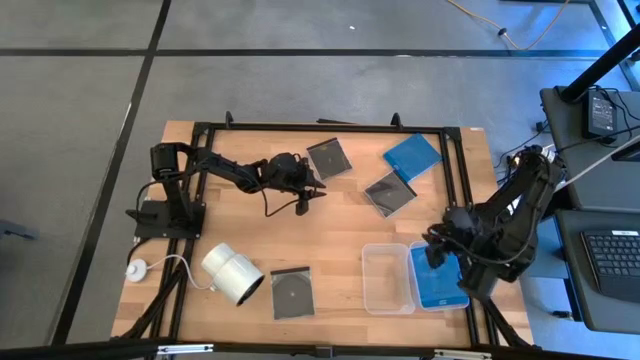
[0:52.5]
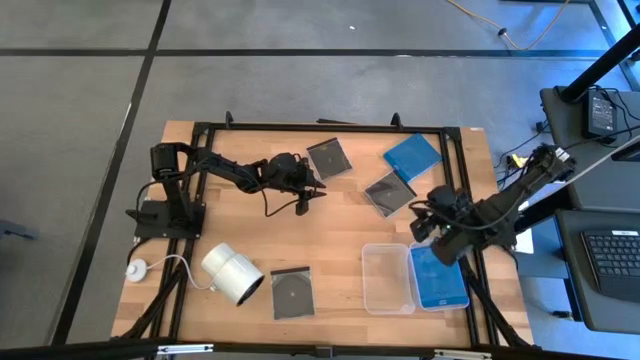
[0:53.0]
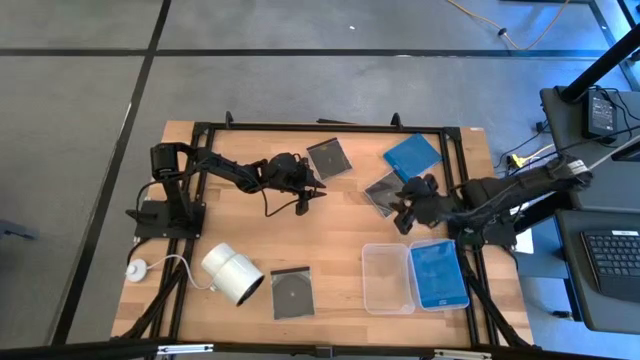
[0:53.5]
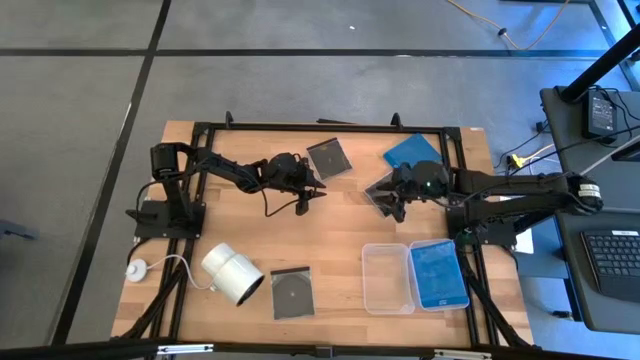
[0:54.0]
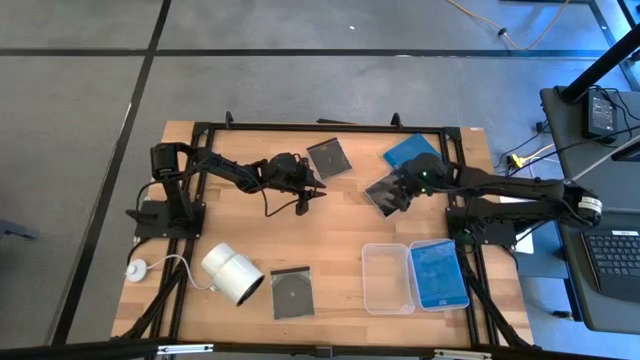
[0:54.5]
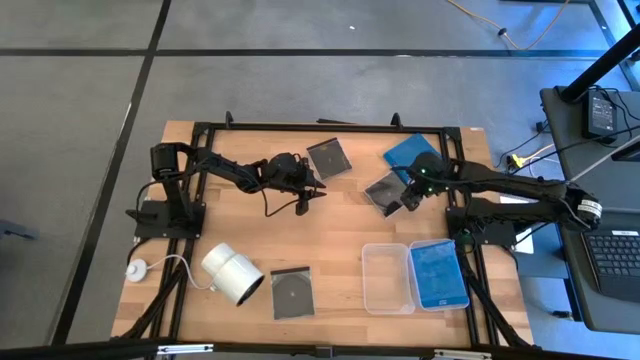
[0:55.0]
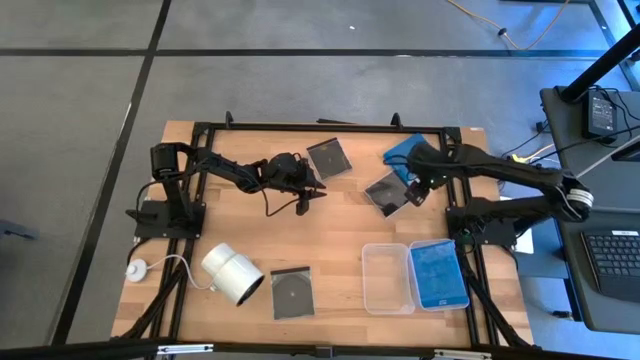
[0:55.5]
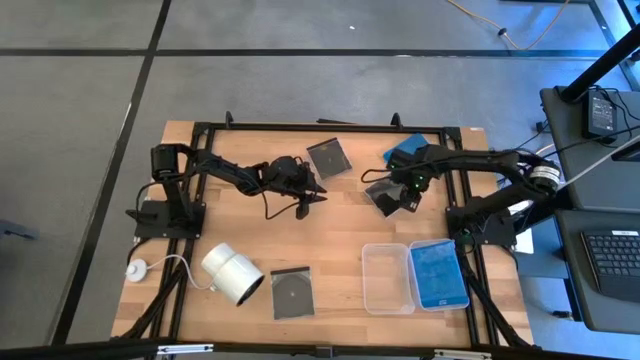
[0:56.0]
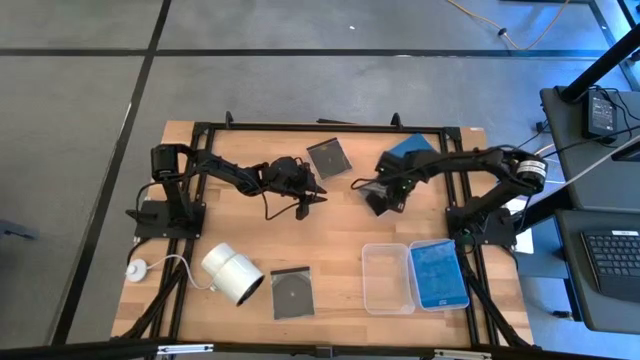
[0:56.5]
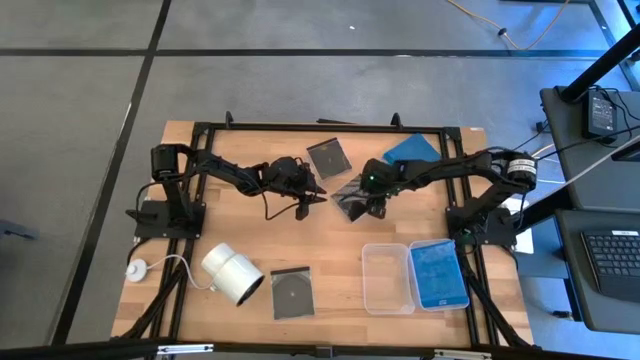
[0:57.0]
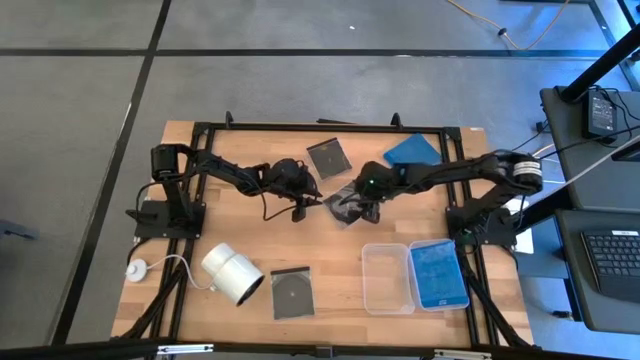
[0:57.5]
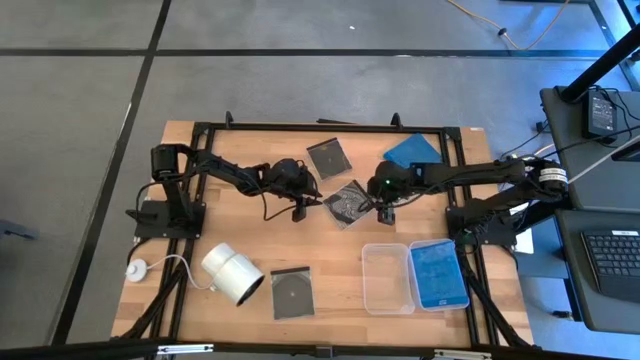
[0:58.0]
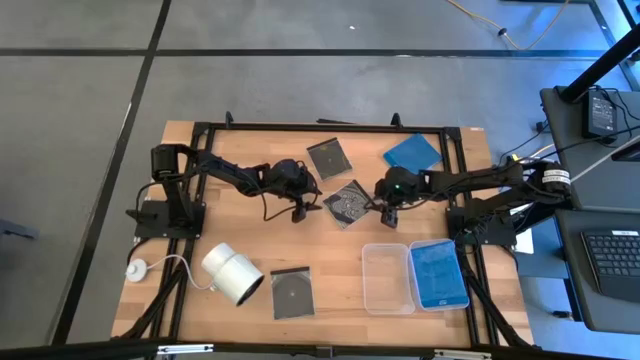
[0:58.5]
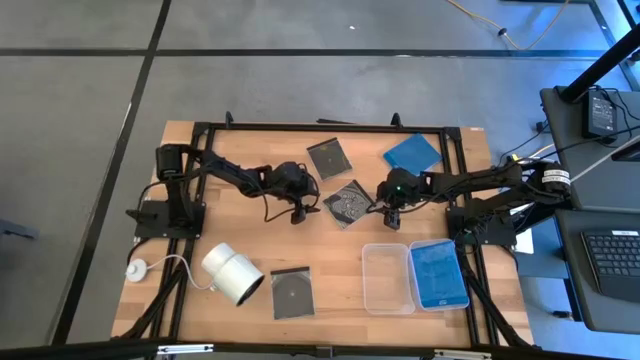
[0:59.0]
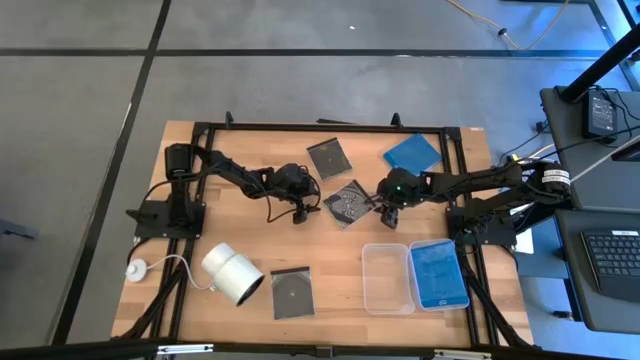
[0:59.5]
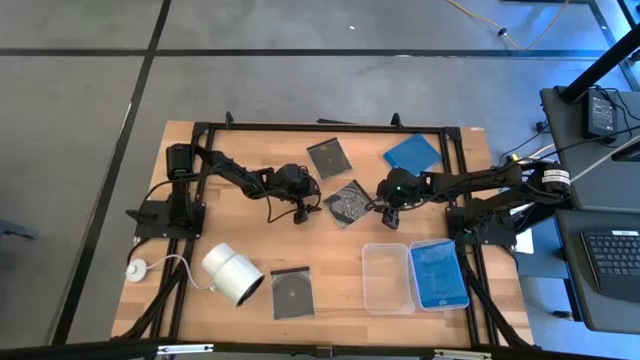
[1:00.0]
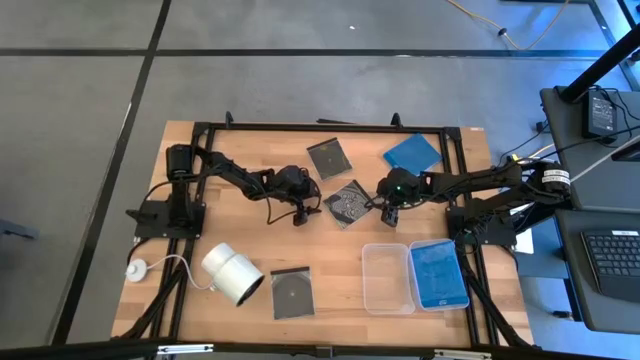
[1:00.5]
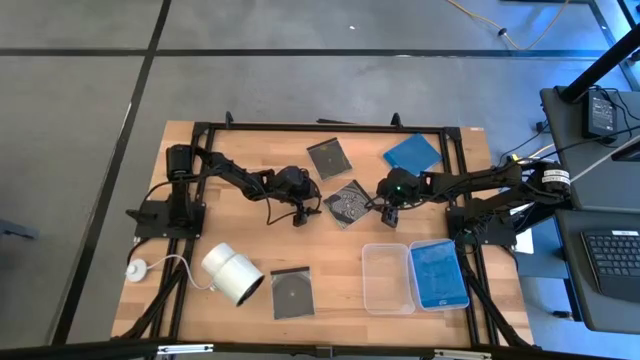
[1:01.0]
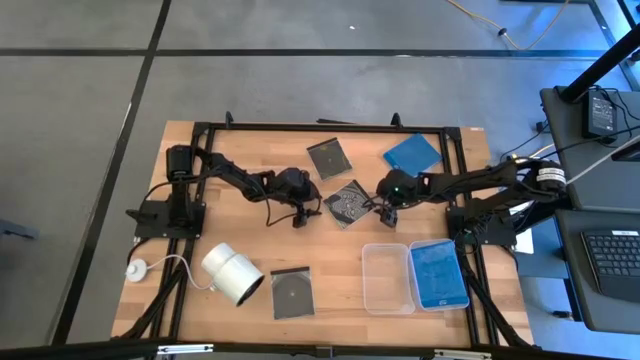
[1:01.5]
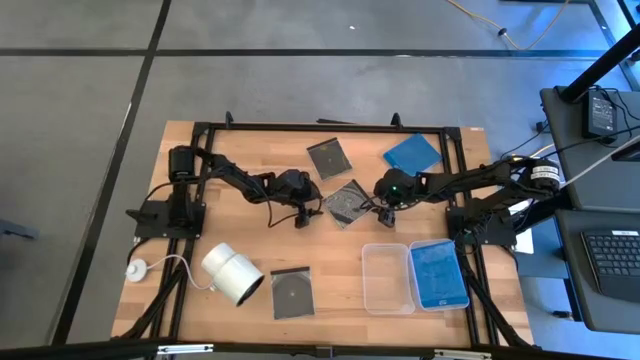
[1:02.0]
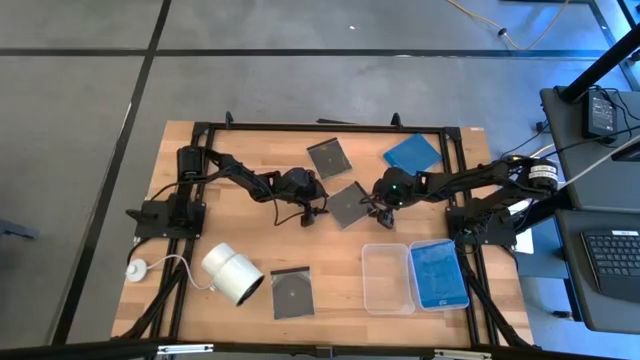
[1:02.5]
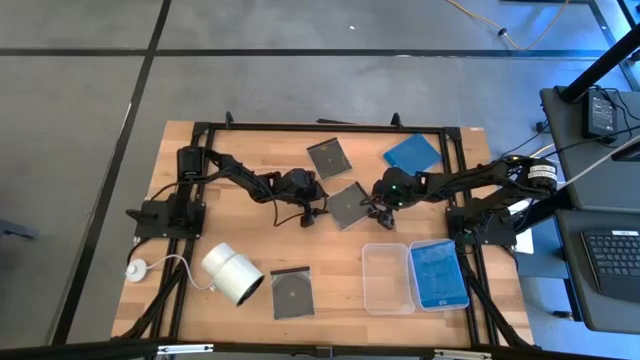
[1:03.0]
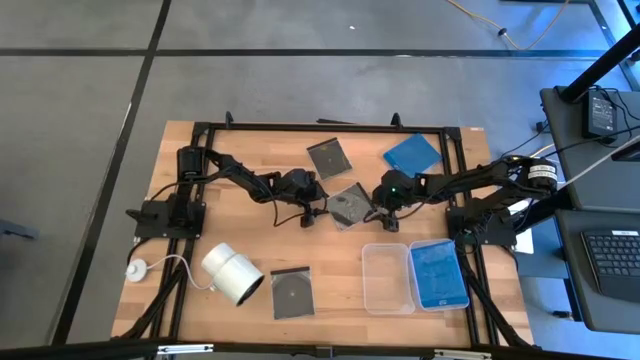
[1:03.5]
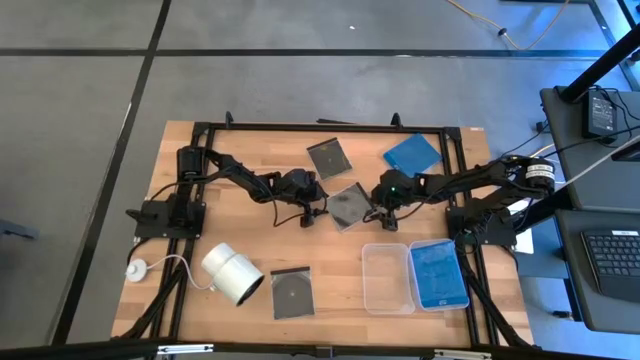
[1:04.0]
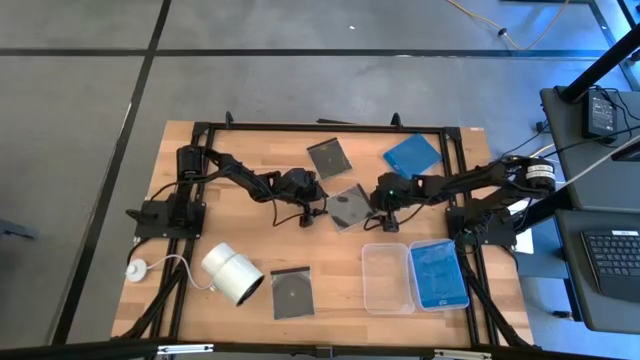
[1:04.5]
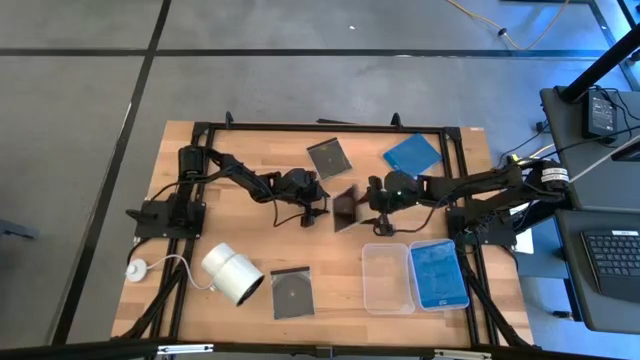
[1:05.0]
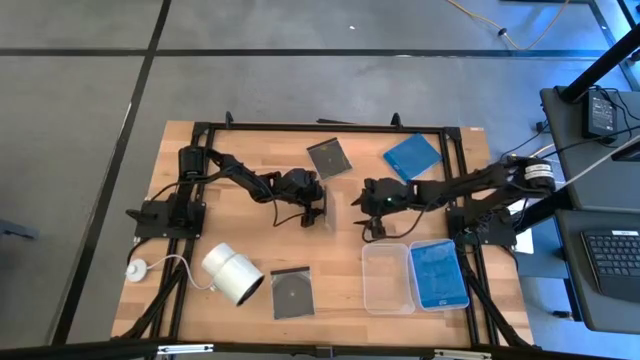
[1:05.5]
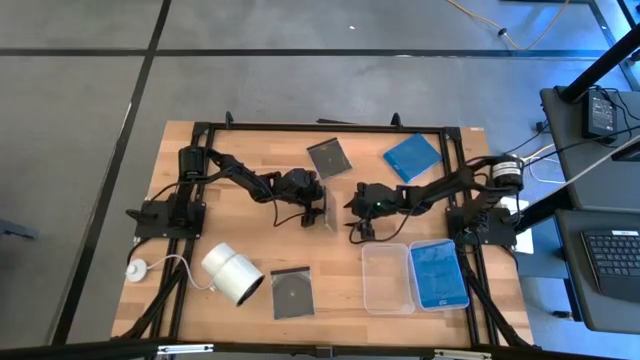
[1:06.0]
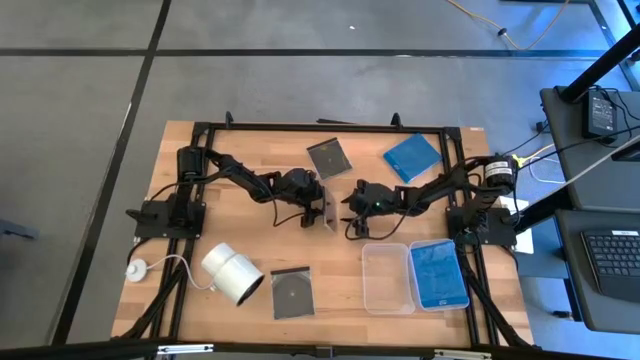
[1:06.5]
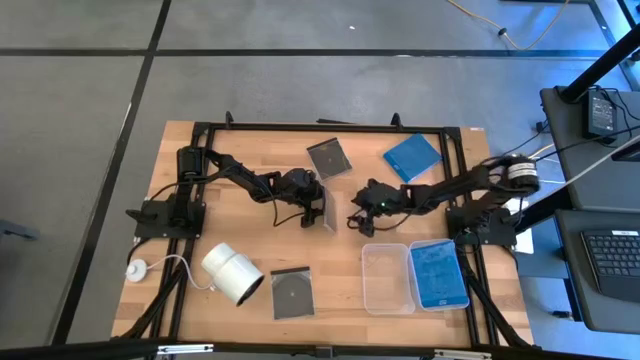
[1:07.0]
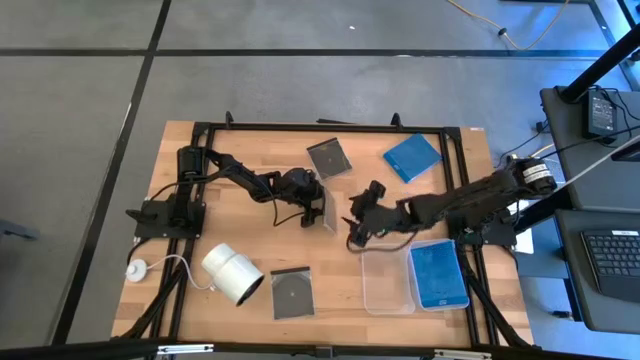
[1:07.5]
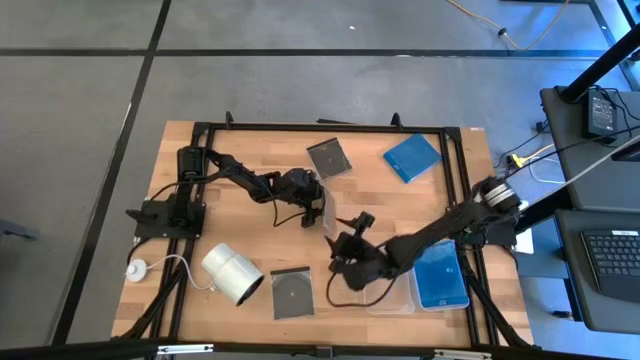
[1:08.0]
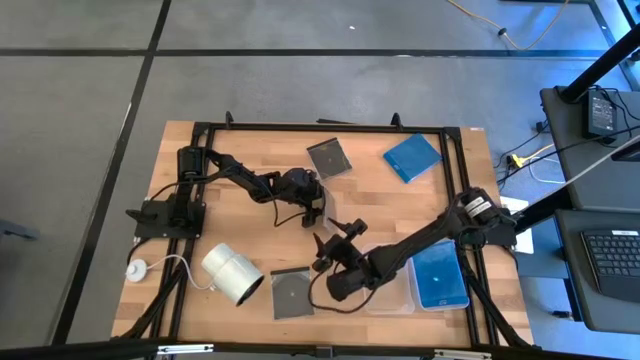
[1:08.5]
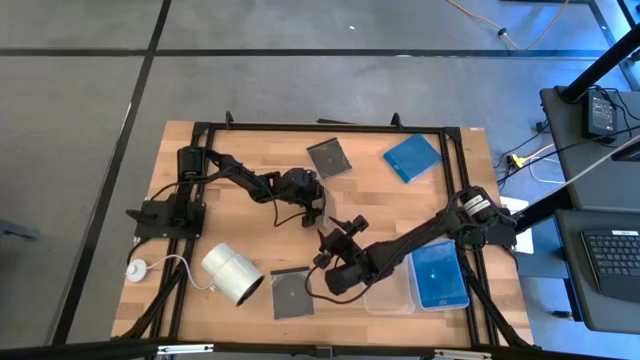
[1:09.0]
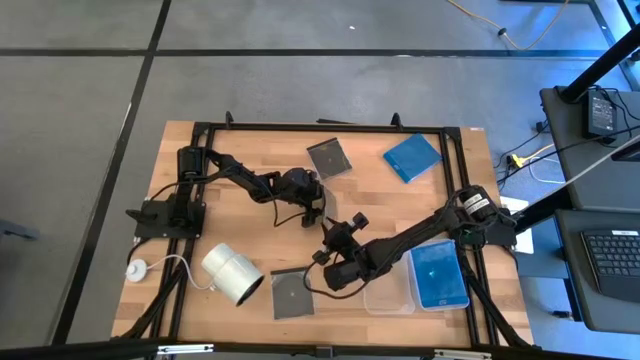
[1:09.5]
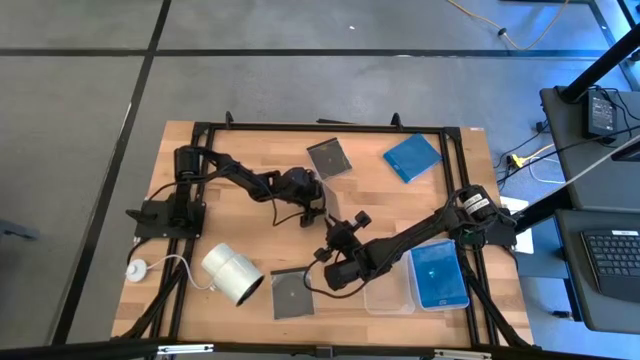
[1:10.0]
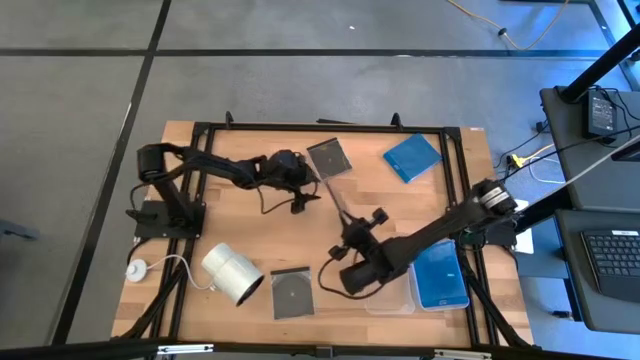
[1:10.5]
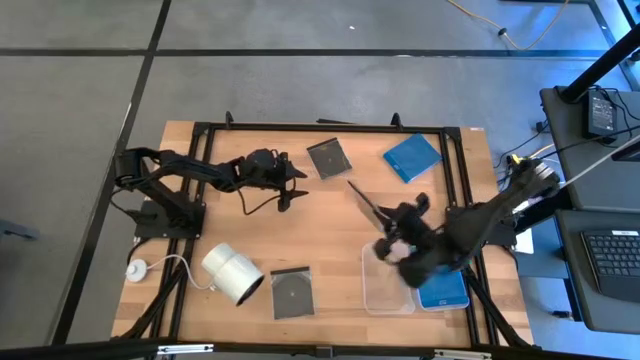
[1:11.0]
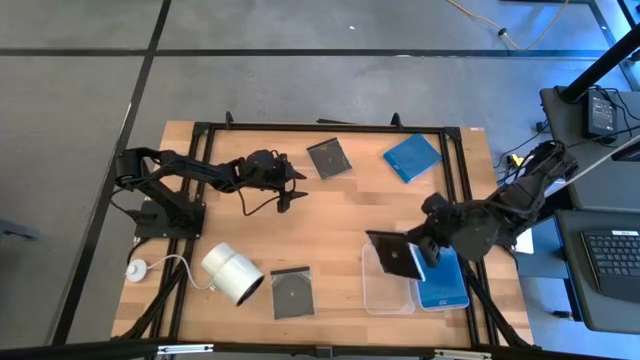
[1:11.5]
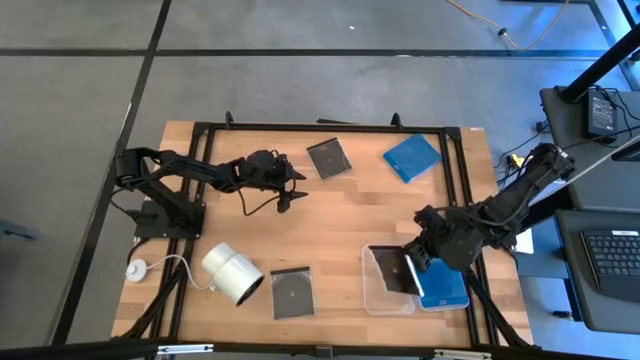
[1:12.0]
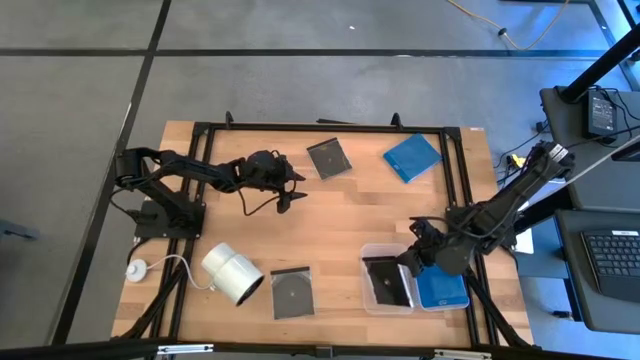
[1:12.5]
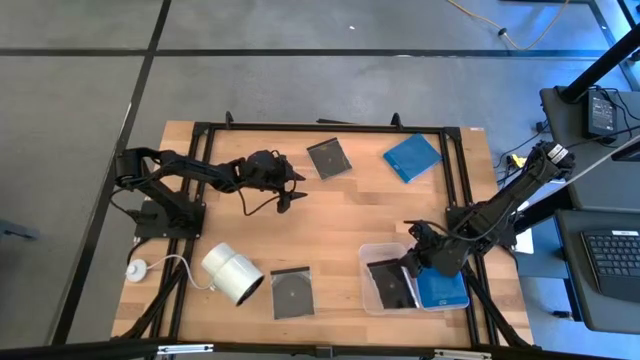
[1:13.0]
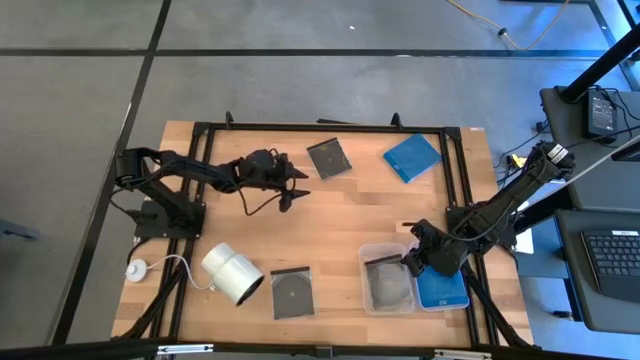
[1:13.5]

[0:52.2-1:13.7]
Task: Pick & place jewel cases by type
Put the middle black CD case into the left transparent bin
